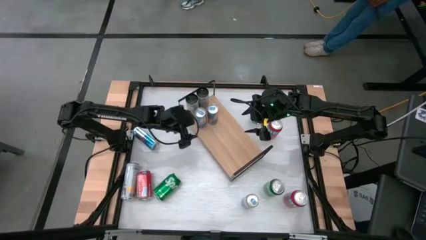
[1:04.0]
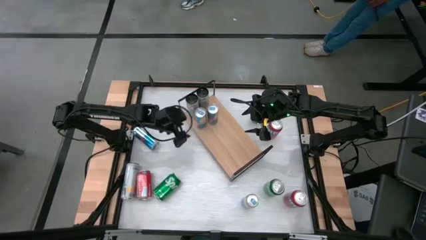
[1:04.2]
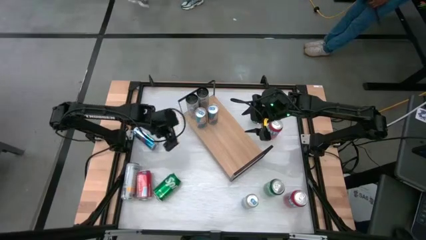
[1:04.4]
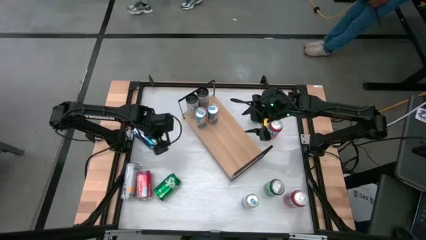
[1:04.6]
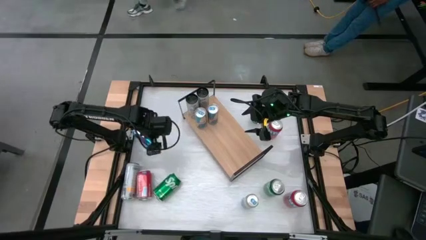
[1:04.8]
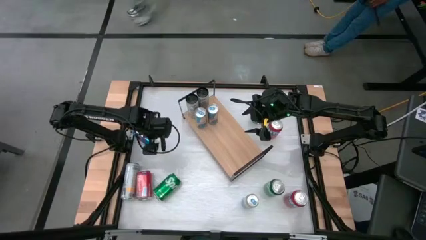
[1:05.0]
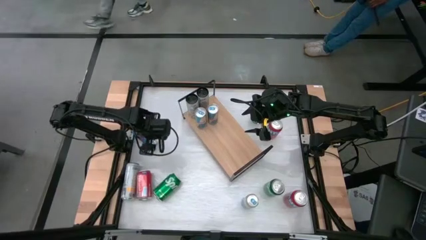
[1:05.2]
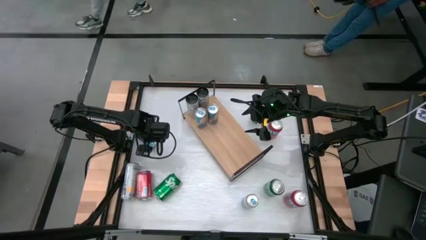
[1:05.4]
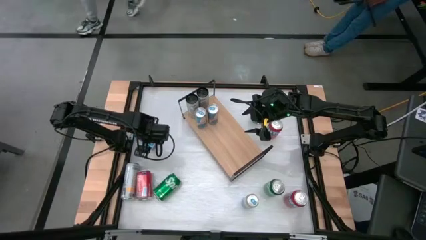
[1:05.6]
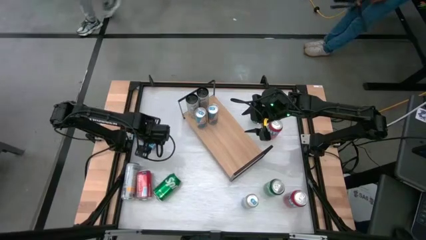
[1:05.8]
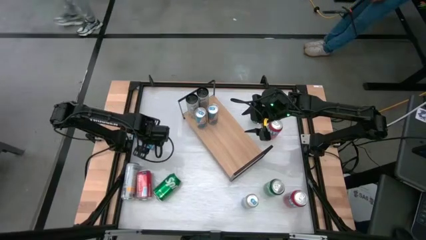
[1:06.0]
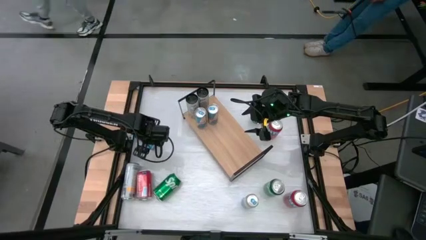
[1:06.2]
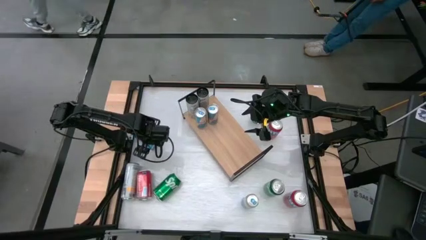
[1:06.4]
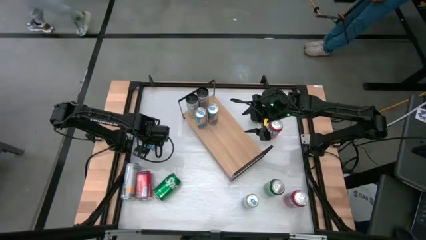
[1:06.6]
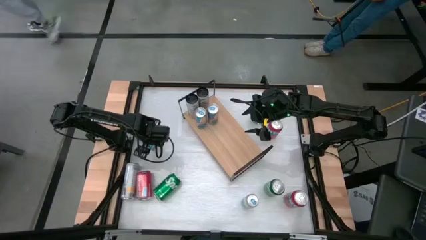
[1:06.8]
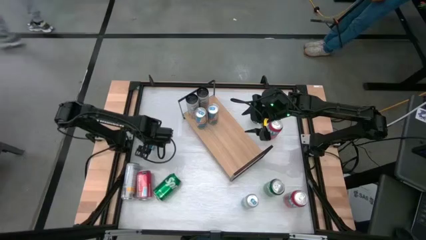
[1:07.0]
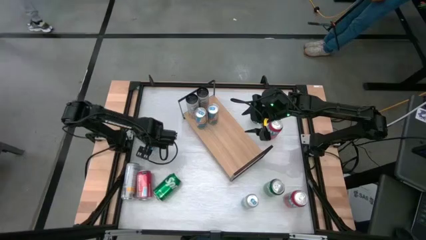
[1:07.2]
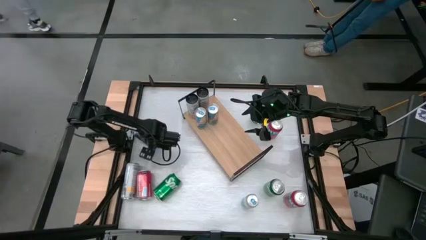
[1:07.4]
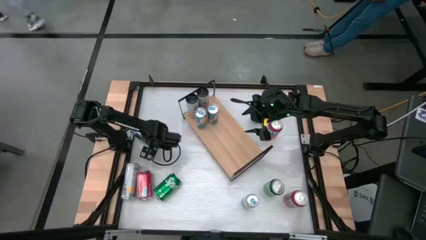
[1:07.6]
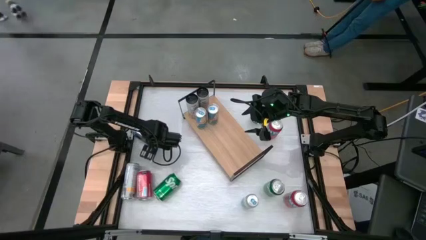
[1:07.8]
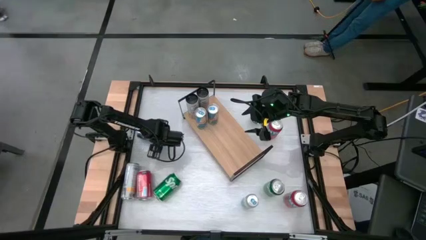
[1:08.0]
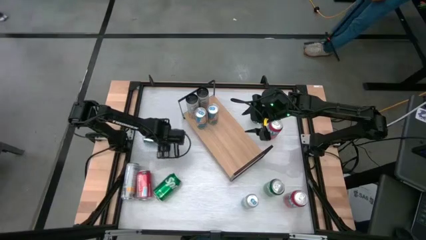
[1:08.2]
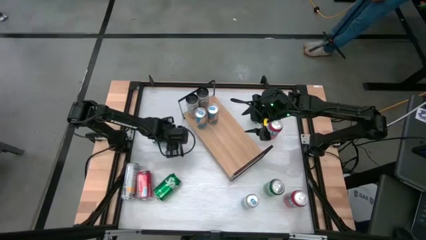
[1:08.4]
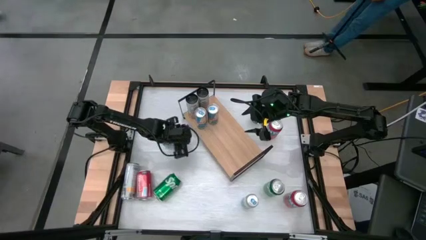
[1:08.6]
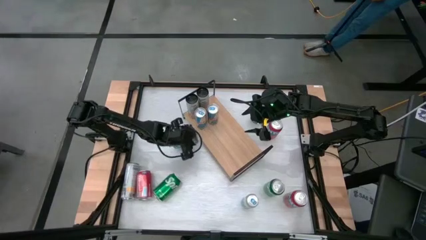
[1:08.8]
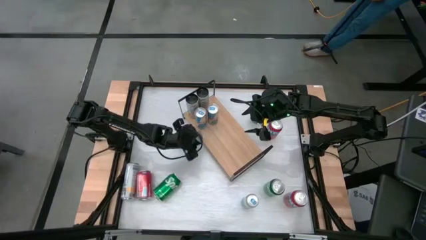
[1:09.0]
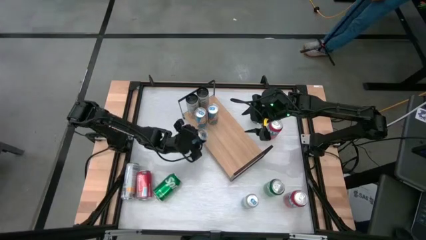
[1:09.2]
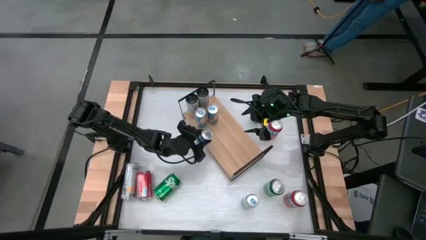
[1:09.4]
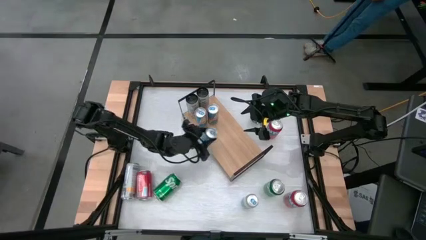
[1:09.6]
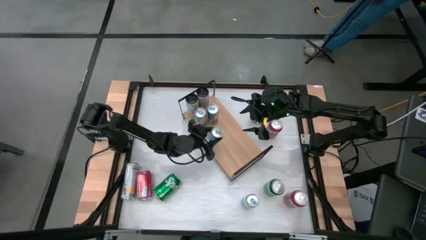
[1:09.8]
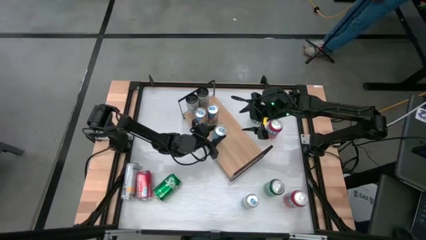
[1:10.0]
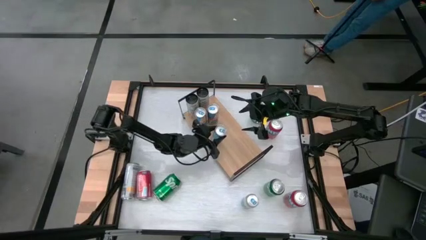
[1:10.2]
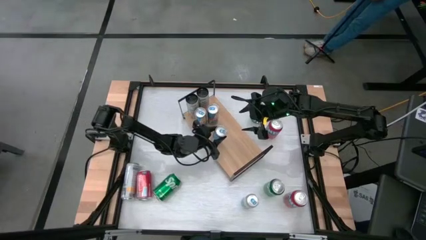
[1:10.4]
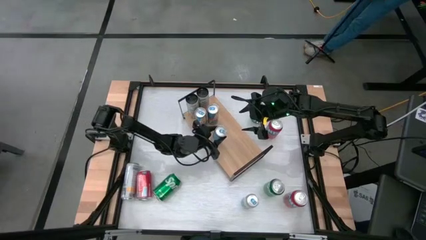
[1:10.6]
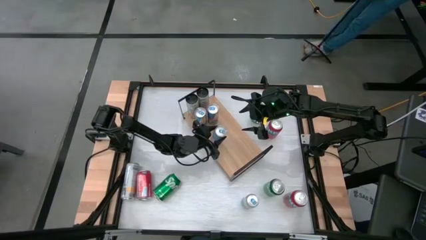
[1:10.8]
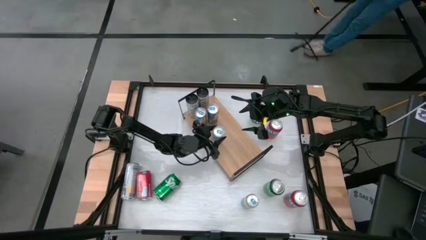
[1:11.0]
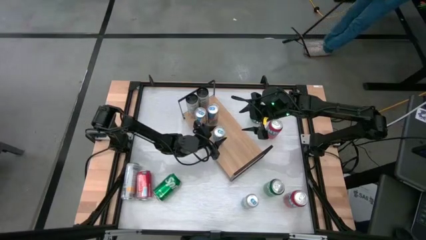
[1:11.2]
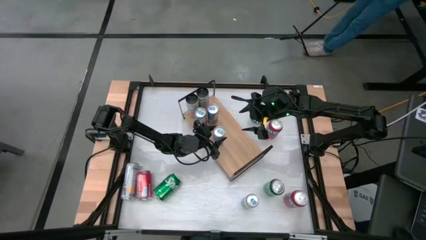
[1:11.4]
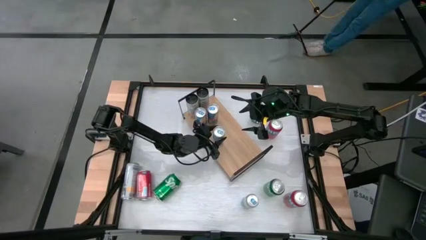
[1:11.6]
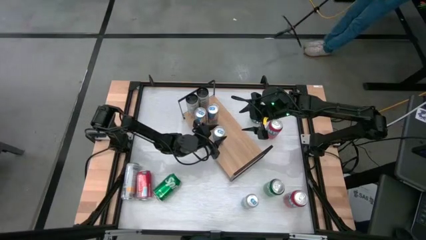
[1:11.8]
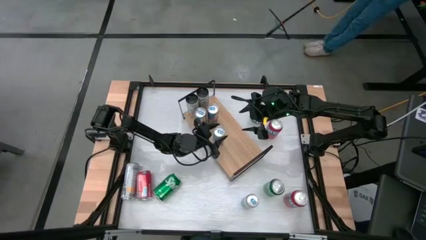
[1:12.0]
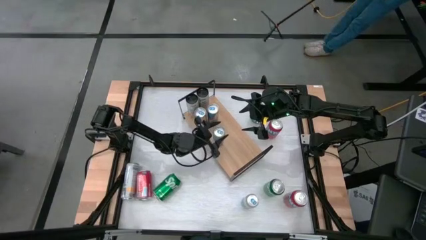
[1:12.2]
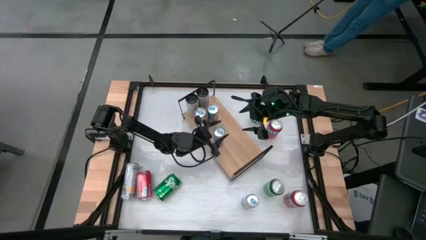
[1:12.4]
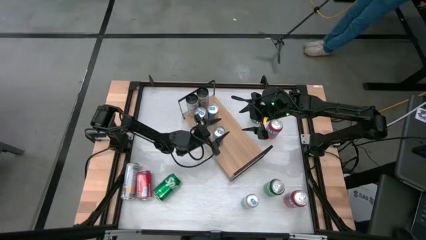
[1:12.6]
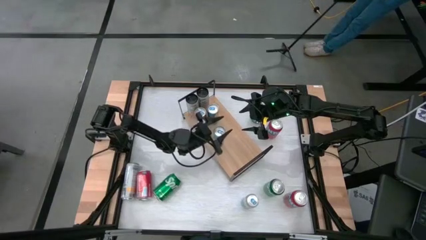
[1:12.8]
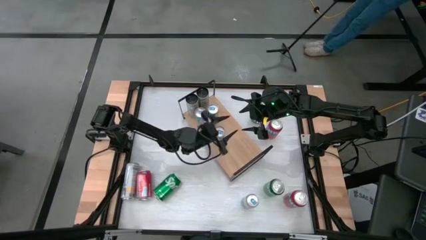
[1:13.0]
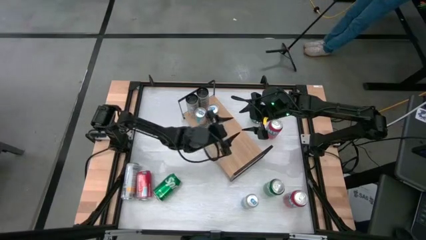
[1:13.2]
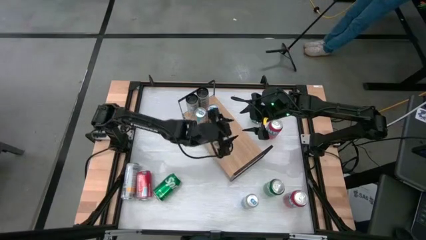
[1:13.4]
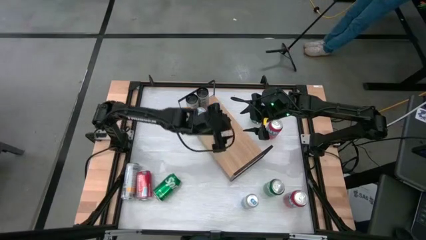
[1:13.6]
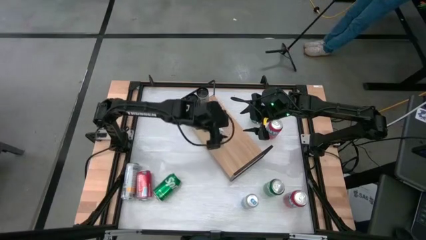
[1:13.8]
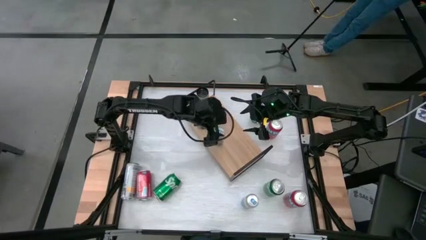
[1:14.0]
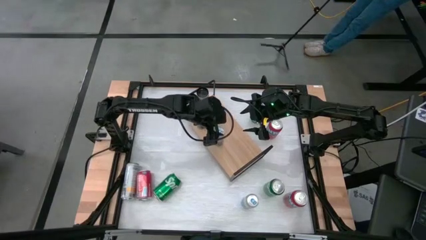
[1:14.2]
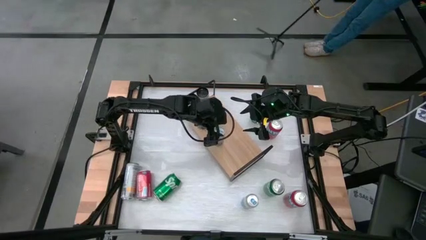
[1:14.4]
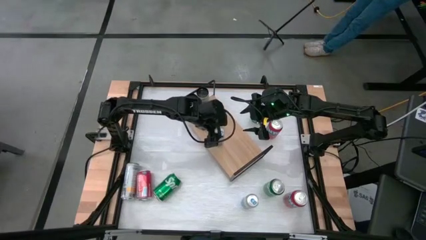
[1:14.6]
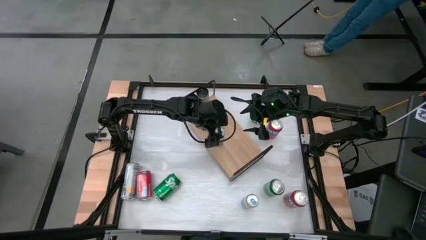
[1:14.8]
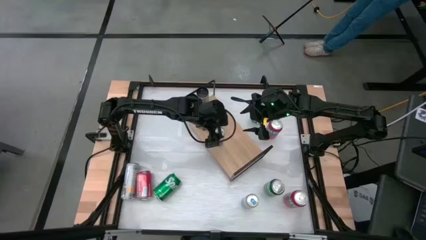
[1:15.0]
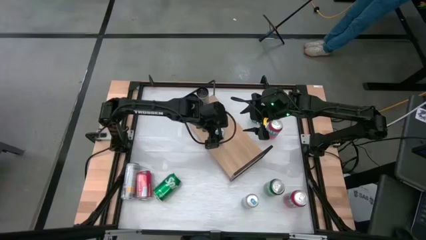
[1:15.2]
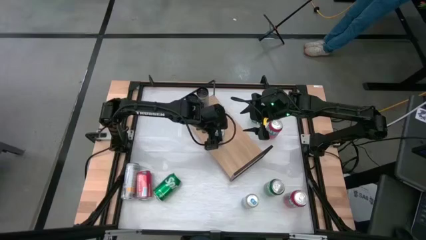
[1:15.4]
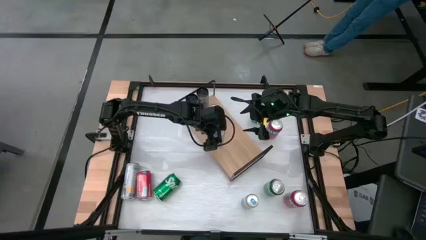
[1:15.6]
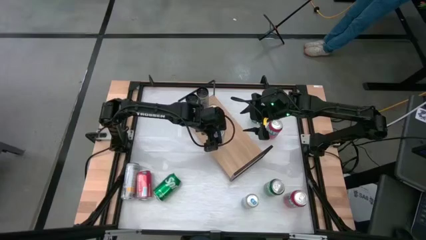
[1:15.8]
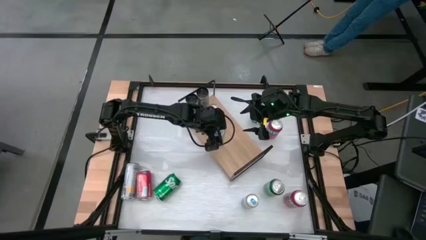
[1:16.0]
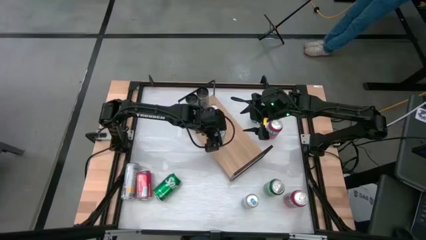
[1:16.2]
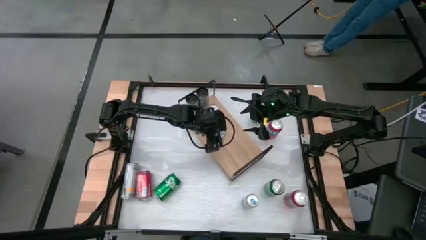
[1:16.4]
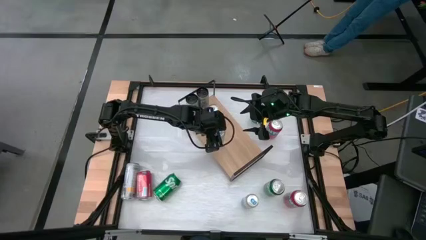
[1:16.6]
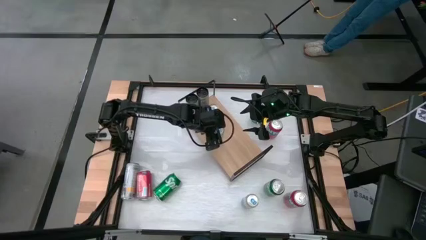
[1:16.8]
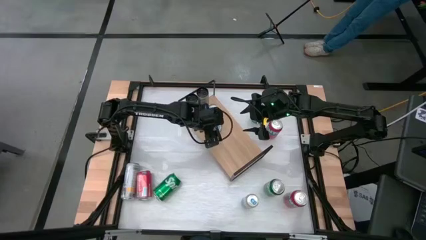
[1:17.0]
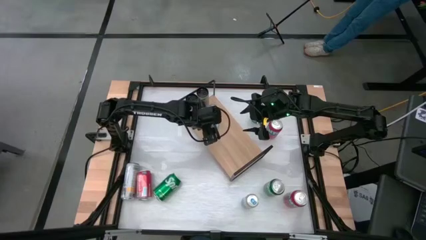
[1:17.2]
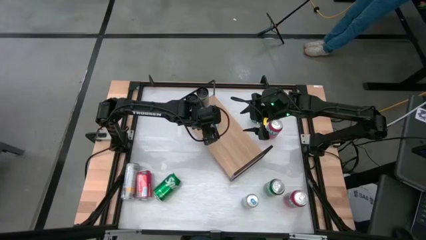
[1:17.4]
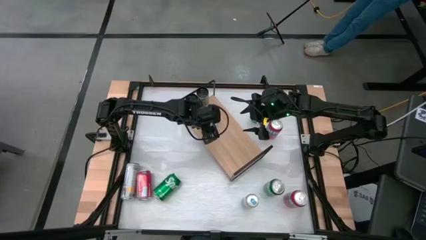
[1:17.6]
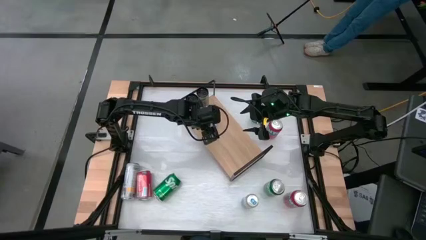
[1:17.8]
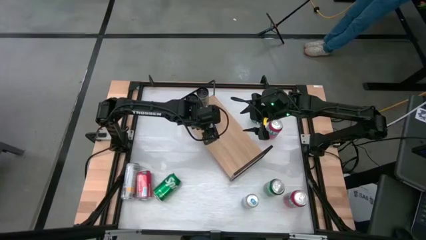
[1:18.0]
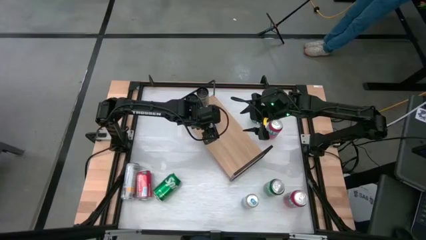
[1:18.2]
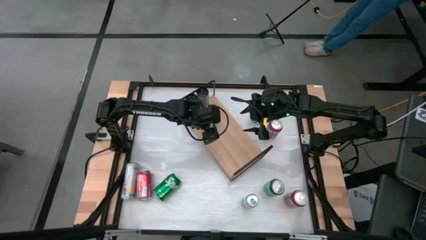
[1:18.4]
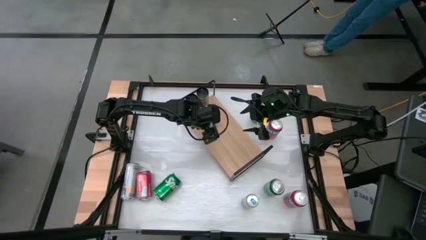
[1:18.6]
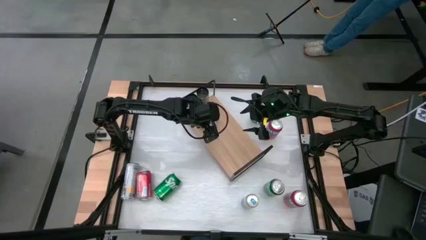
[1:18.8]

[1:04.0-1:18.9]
Task: Place canned beverage on shelf
Put the top blue soda can on the shelf
